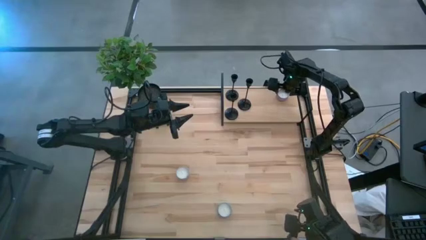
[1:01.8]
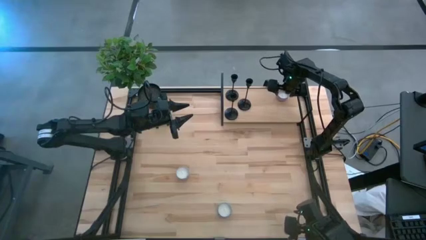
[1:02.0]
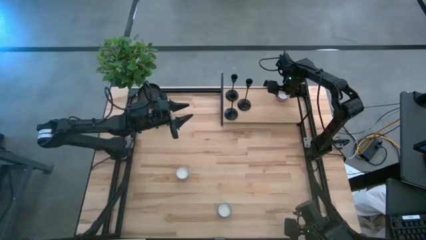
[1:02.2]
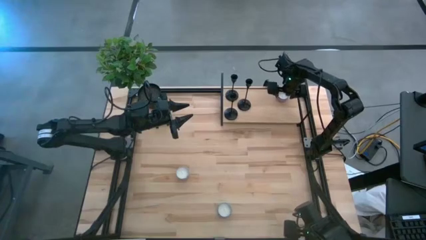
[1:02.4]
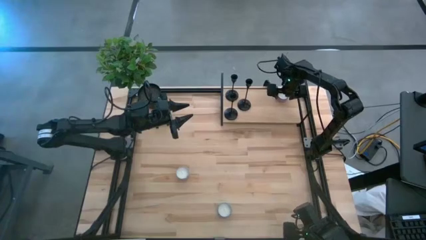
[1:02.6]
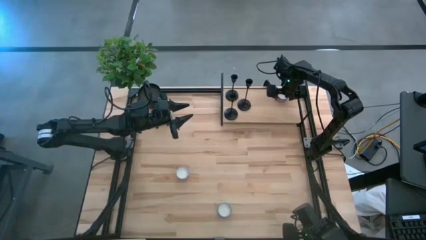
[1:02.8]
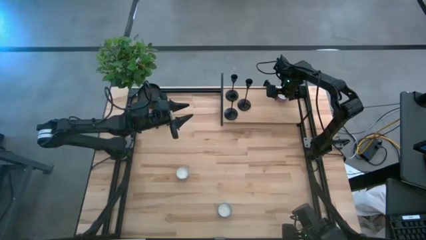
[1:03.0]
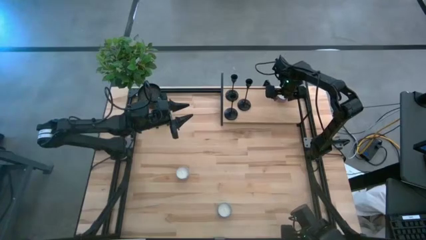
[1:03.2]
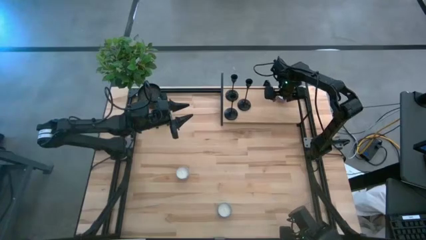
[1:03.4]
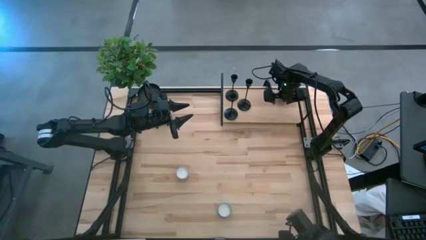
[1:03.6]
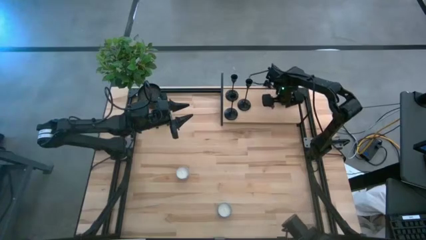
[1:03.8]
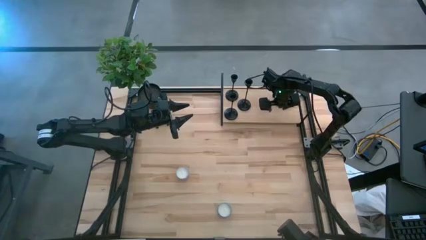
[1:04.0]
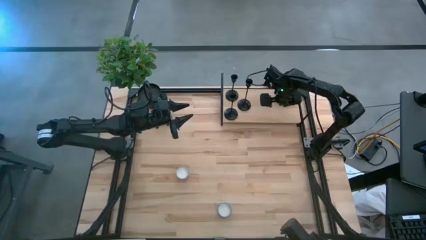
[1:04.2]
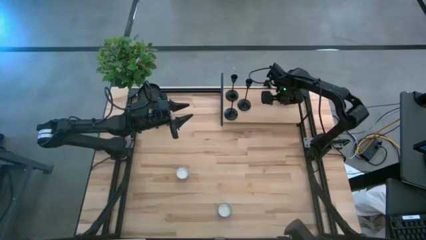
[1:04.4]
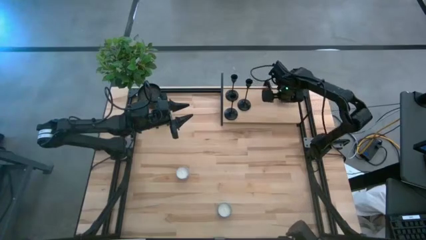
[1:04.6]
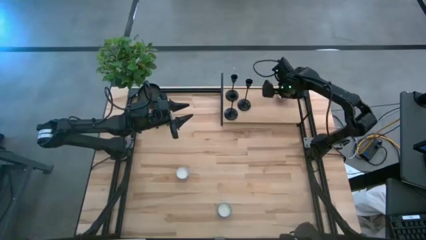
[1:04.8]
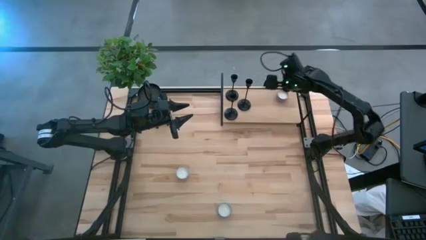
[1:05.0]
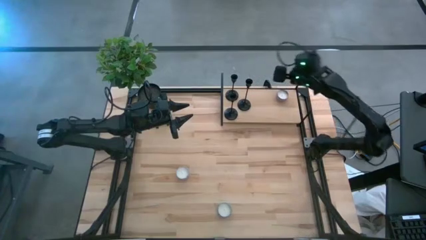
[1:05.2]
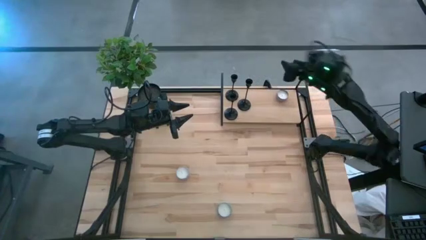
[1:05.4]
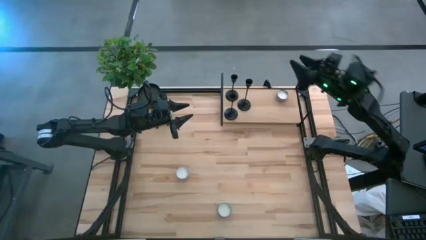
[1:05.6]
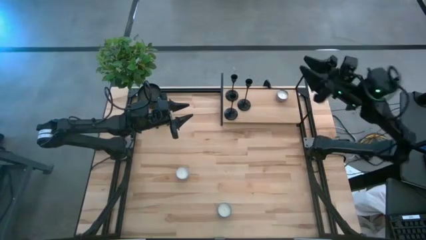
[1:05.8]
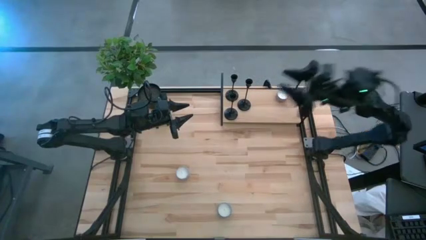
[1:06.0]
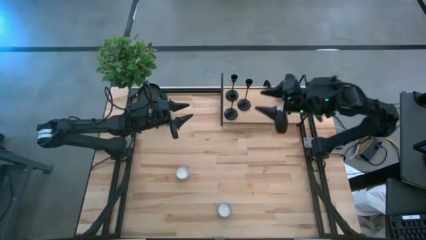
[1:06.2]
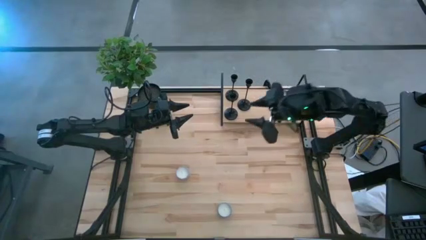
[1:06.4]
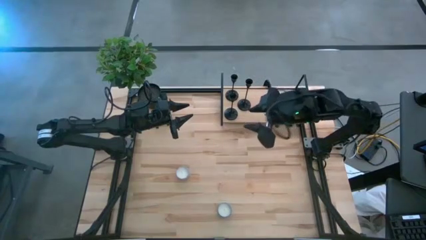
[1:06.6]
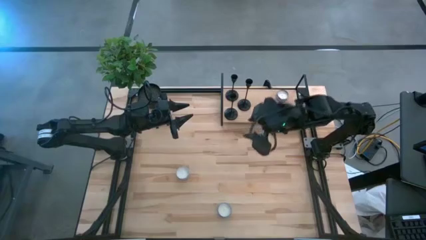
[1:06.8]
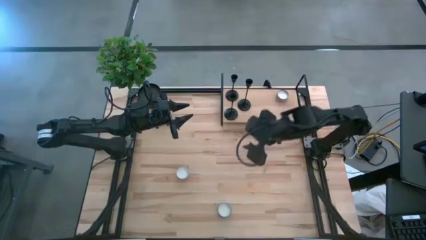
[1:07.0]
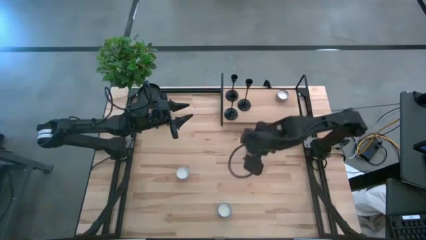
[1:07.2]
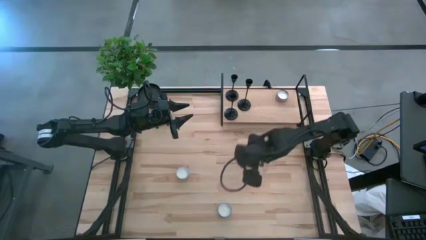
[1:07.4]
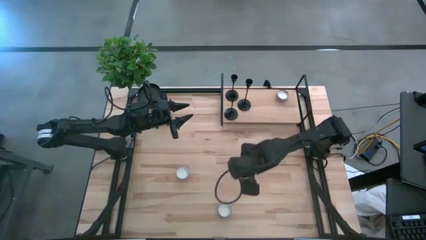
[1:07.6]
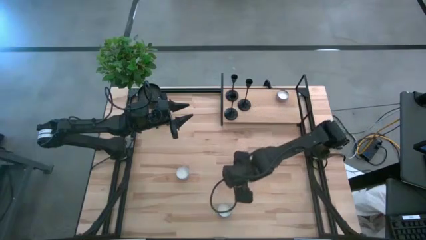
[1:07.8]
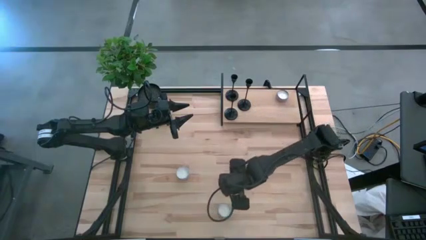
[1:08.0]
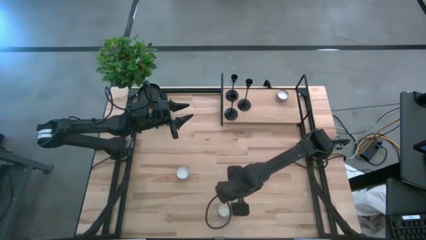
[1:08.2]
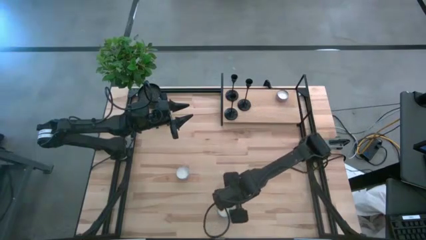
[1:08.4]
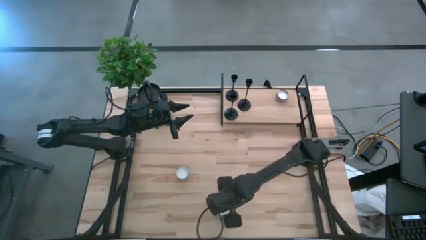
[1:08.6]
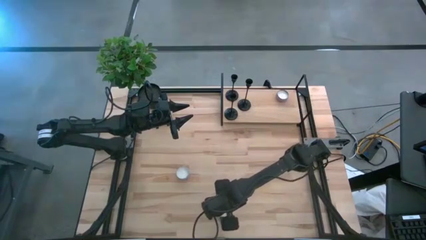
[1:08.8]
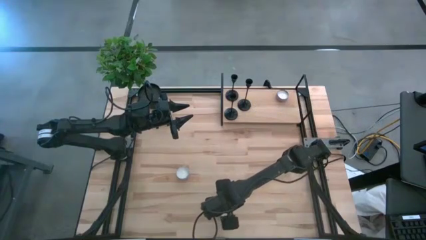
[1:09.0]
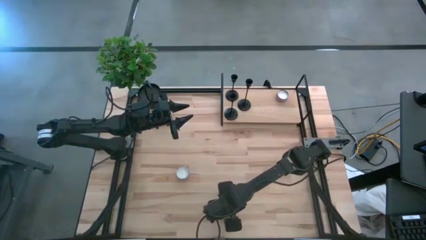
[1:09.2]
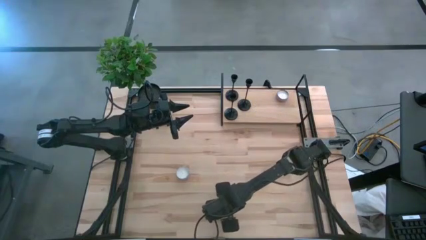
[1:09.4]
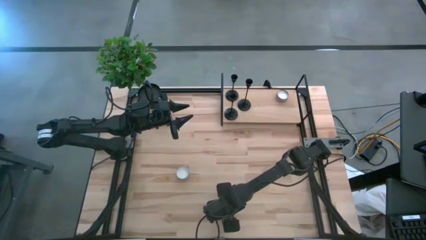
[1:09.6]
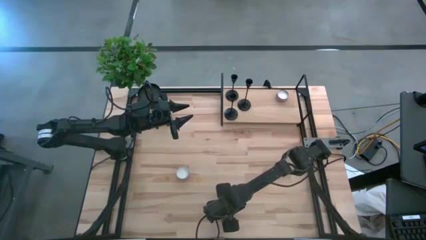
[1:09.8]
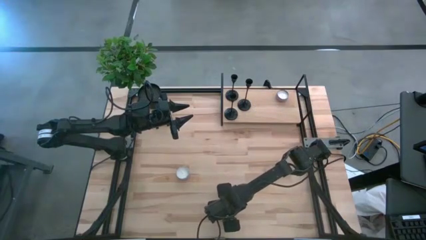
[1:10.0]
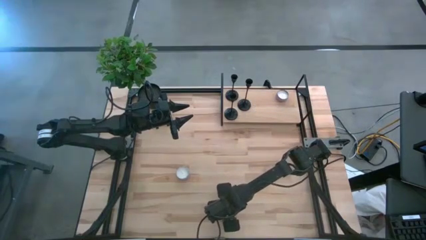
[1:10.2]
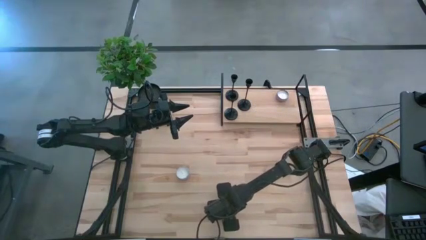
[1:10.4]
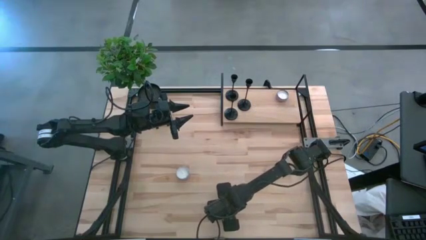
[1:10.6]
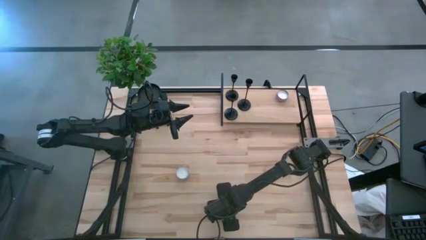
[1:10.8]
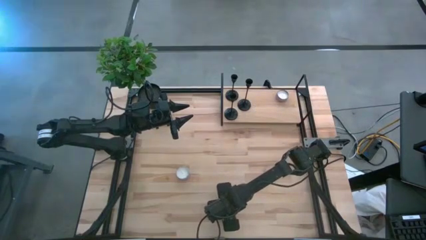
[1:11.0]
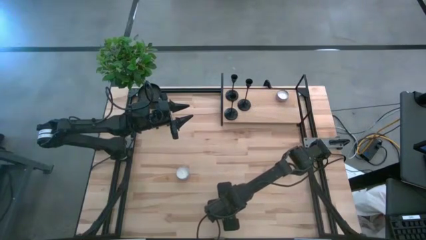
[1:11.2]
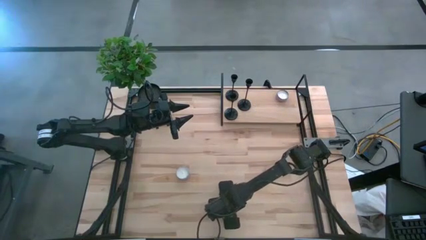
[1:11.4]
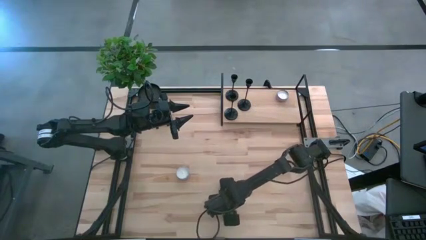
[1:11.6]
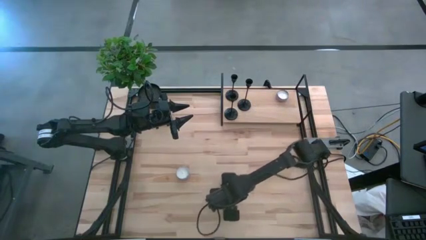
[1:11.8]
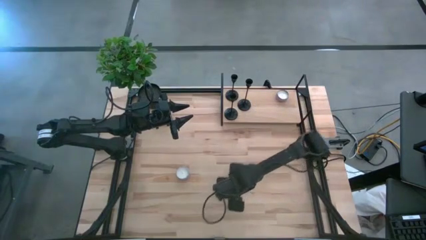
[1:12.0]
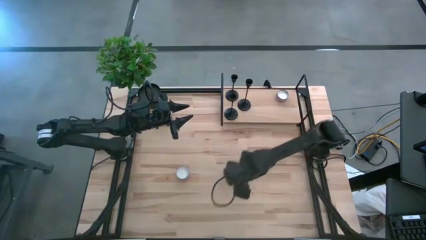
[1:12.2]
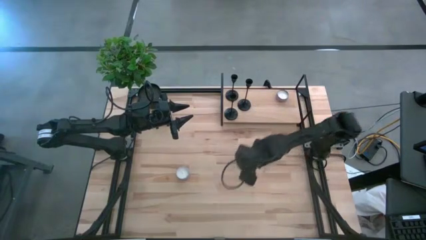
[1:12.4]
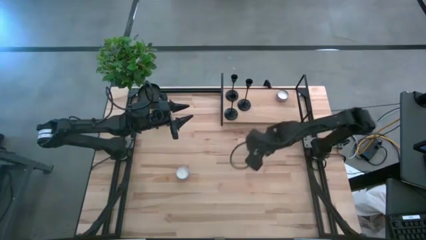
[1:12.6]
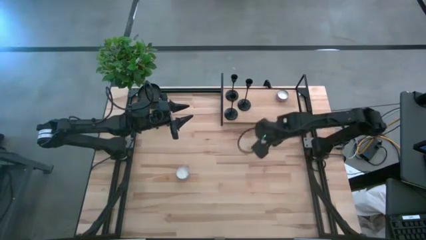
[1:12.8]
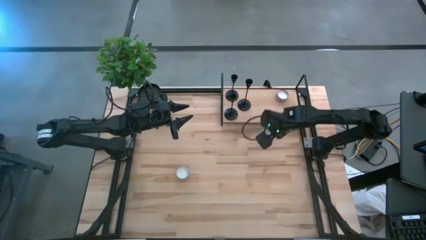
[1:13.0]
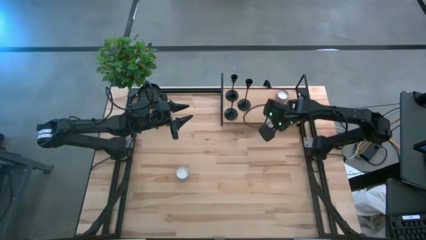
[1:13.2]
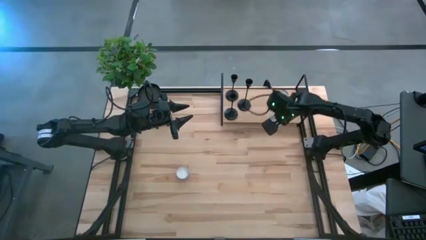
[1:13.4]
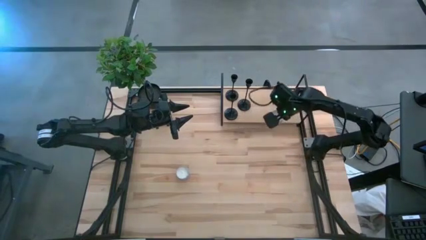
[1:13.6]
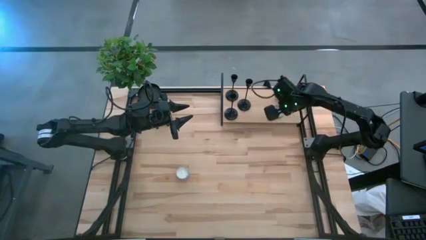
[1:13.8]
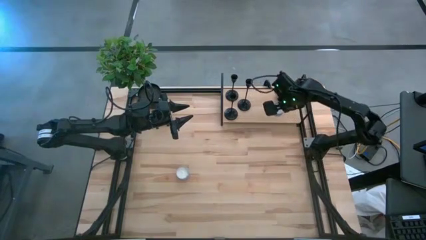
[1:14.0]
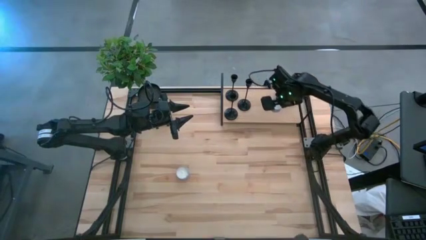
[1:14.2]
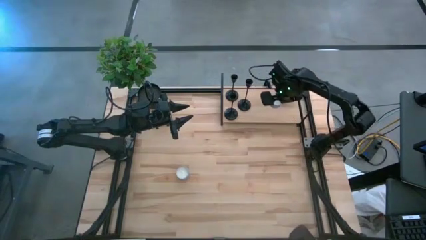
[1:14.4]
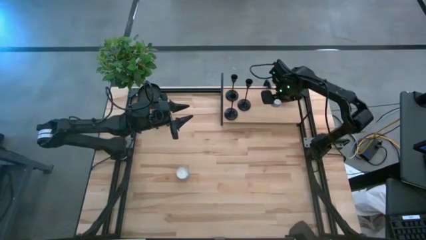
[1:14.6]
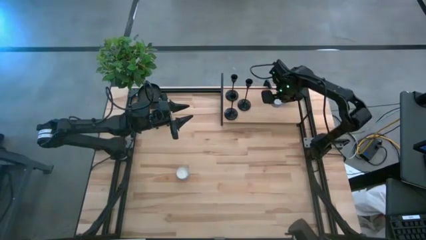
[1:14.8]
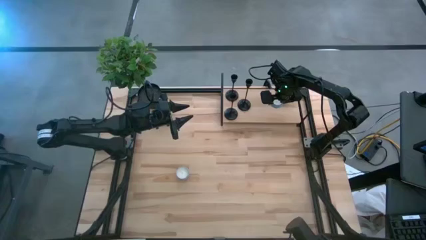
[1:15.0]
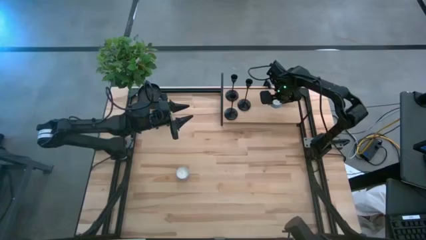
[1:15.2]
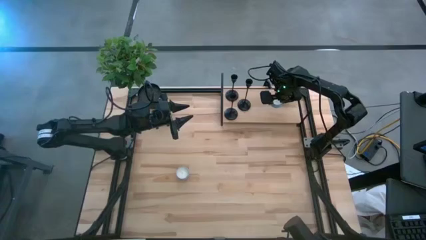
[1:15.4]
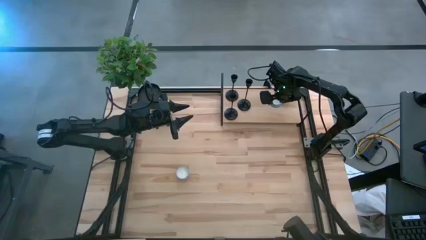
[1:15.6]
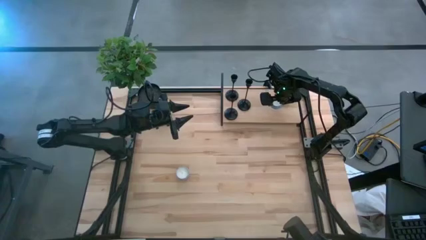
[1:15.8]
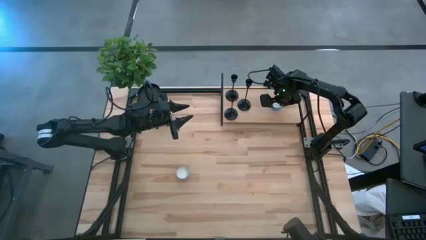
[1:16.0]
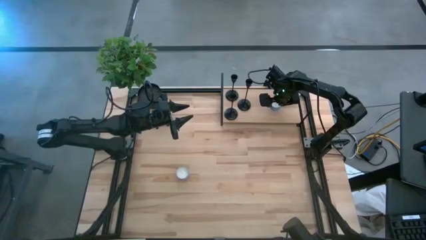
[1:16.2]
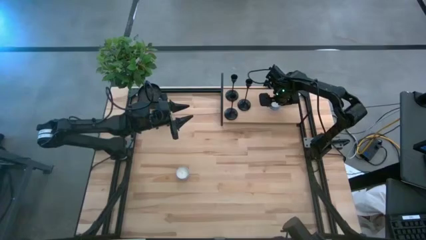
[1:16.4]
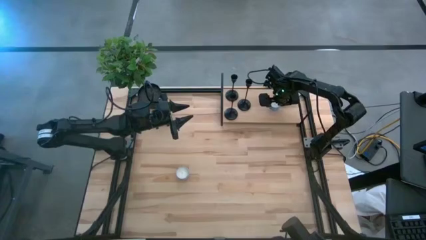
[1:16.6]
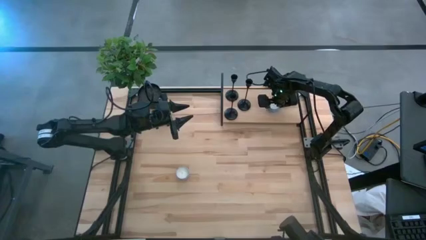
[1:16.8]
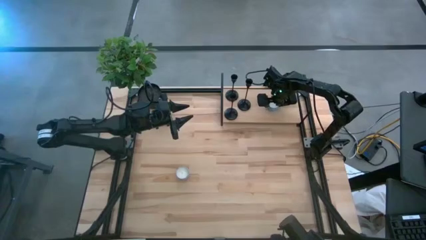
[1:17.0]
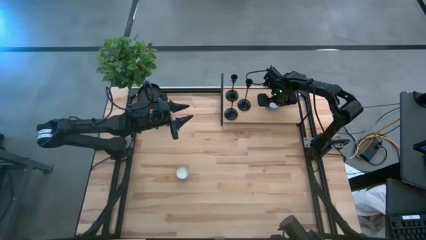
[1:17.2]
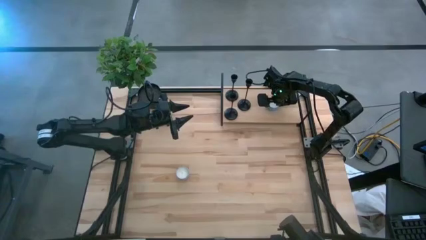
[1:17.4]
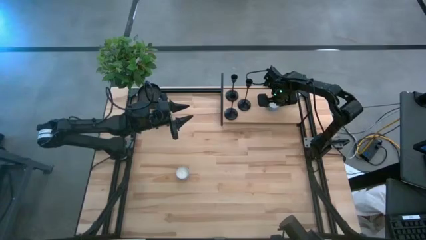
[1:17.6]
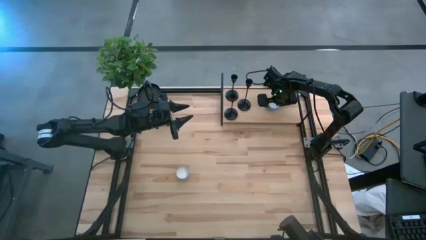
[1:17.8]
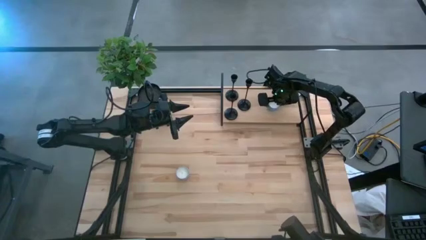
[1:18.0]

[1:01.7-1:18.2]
Task: Pick & Place candle stick holders
Put the bottom blue scented candle on the shelf
